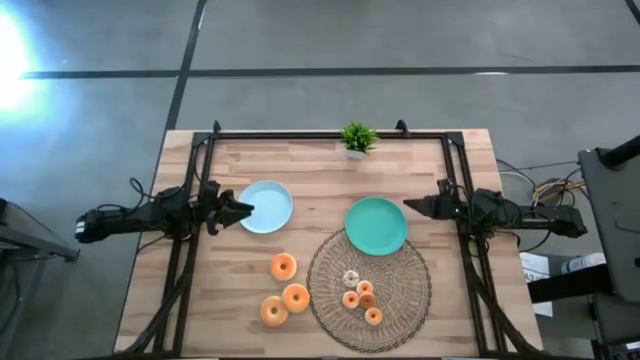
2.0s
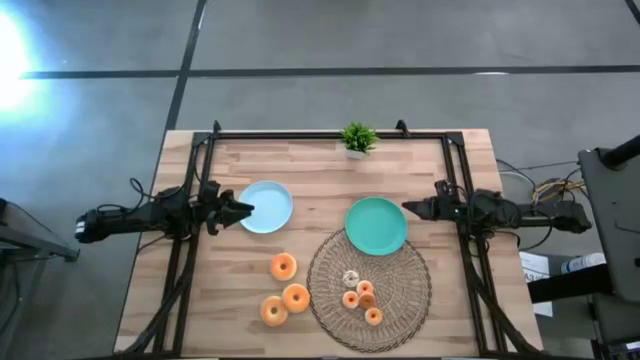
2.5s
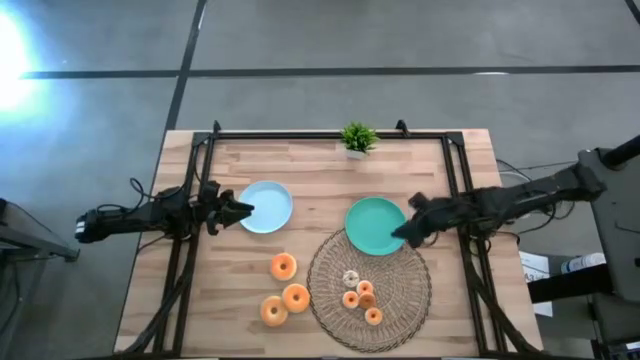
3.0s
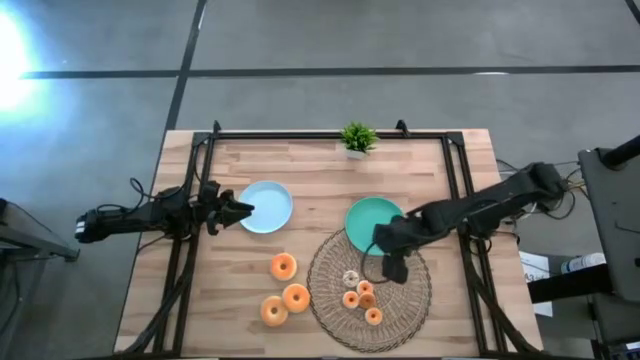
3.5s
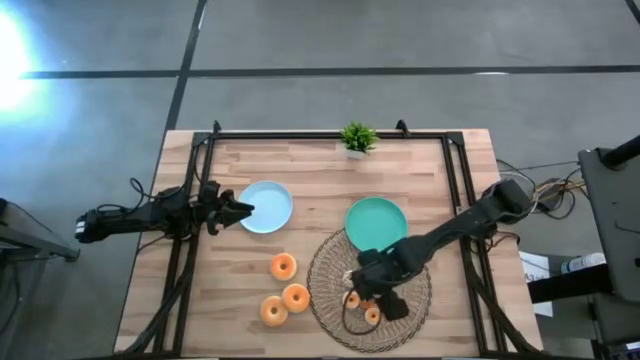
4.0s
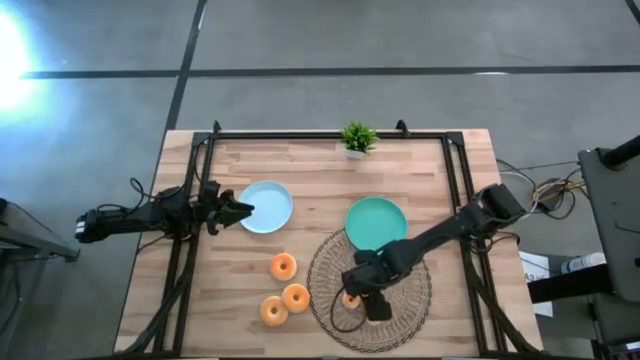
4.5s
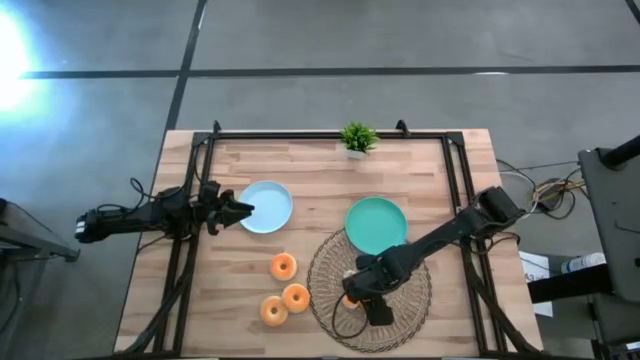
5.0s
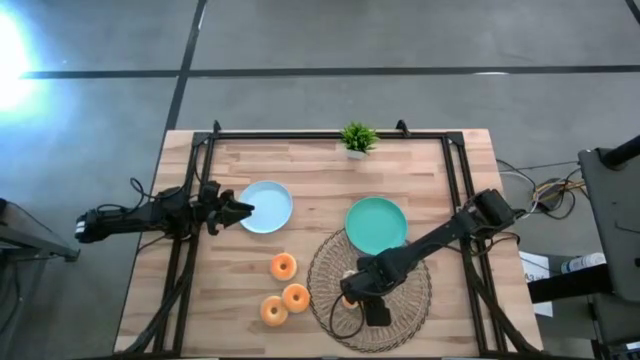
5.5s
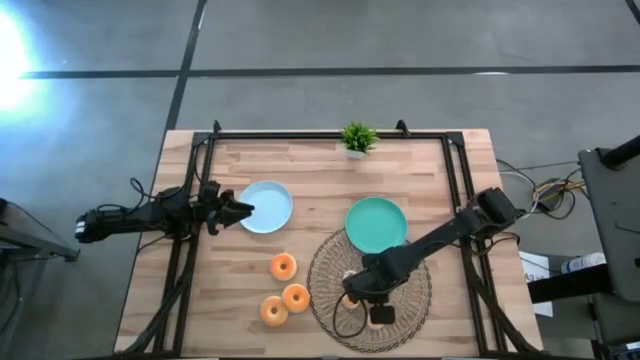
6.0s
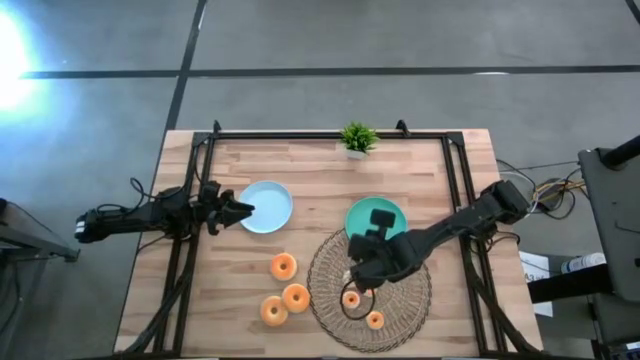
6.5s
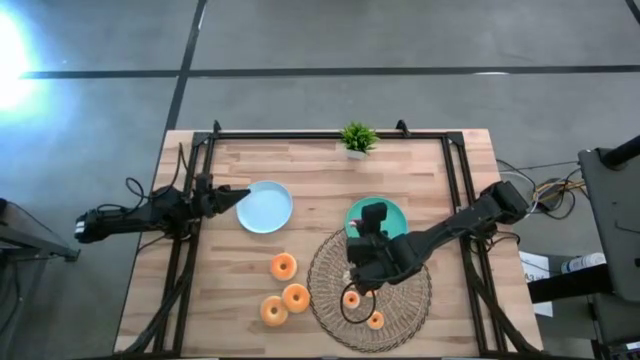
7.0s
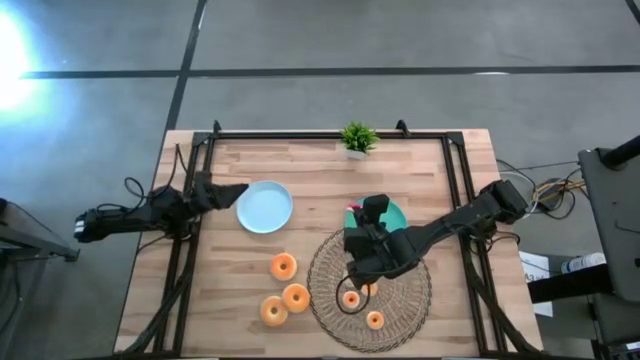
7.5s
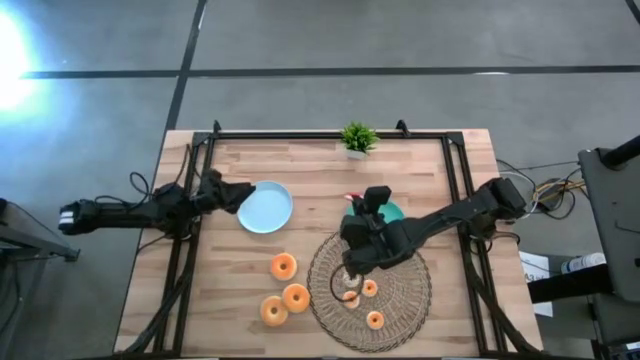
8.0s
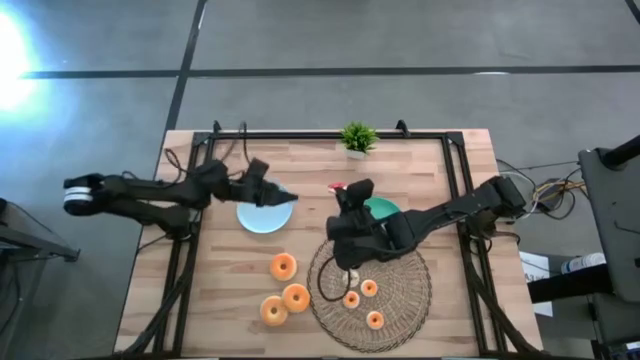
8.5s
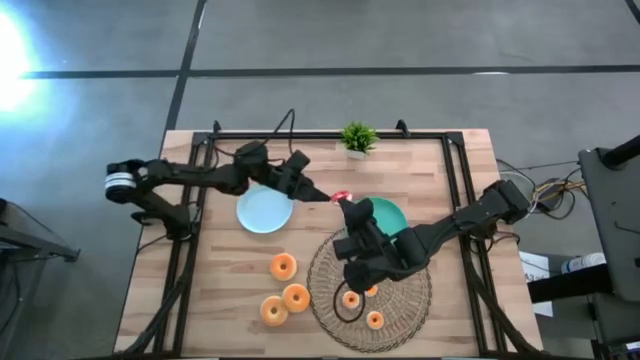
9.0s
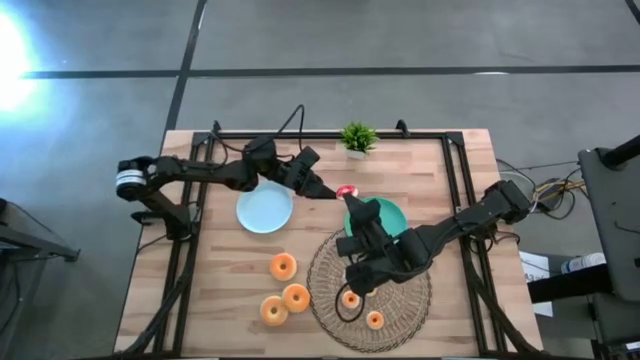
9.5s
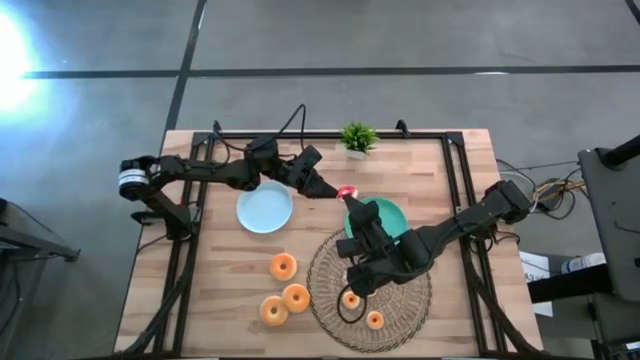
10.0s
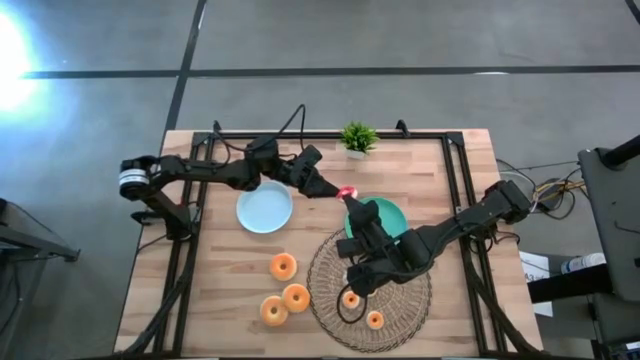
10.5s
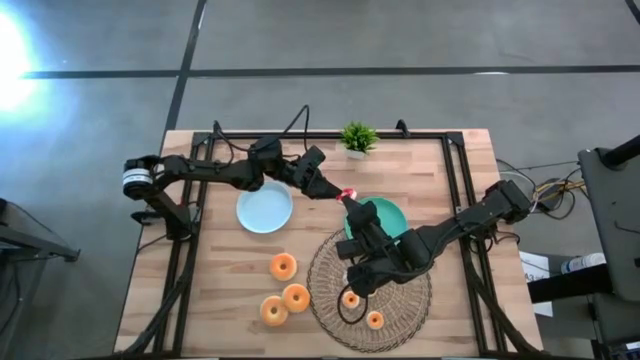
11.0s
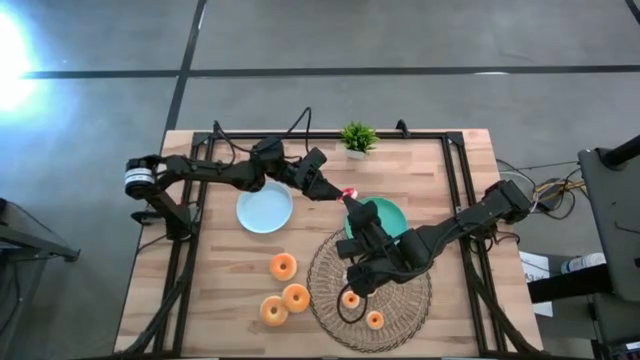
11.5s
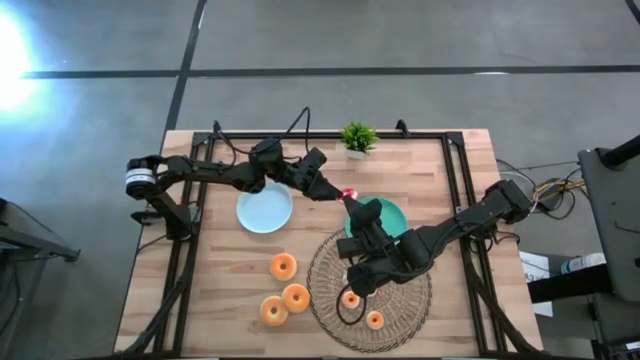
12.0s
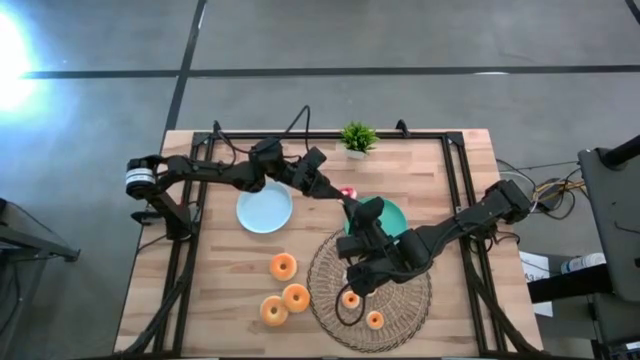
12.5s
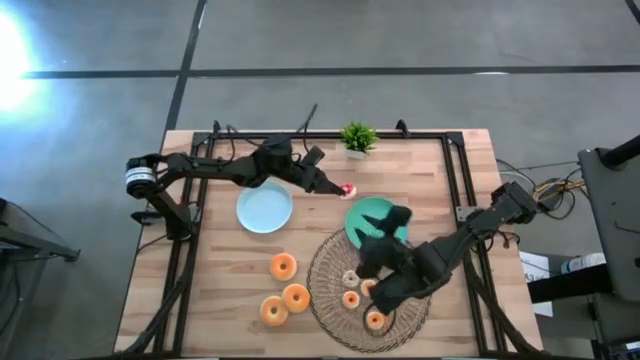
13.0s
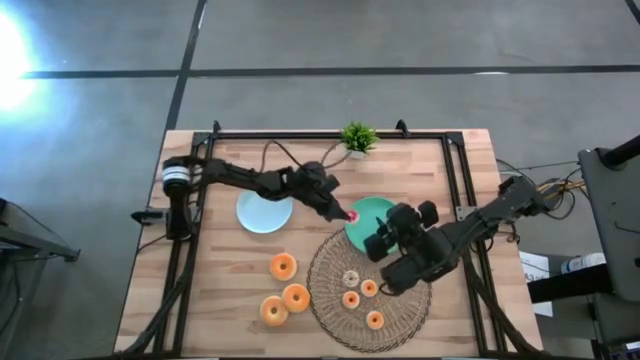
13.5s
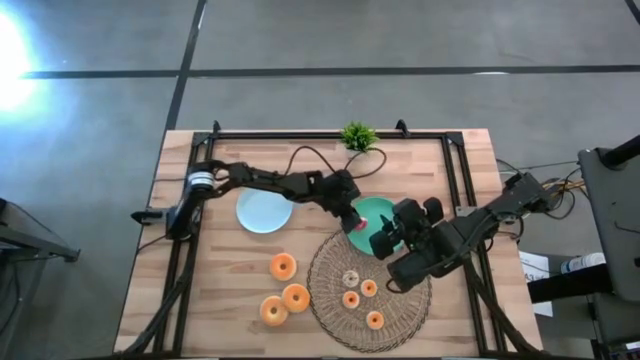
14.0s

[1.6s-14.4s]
Task: Pick & Place donuts
Put the small orange donut on the green plate

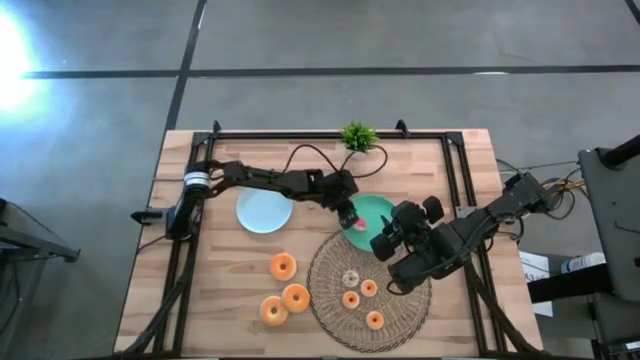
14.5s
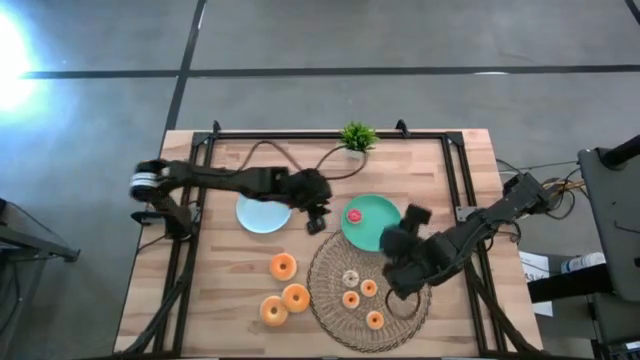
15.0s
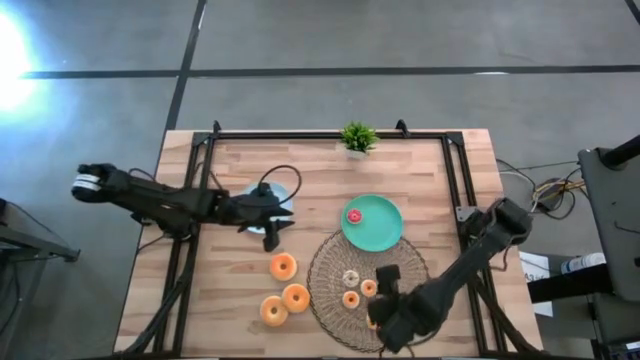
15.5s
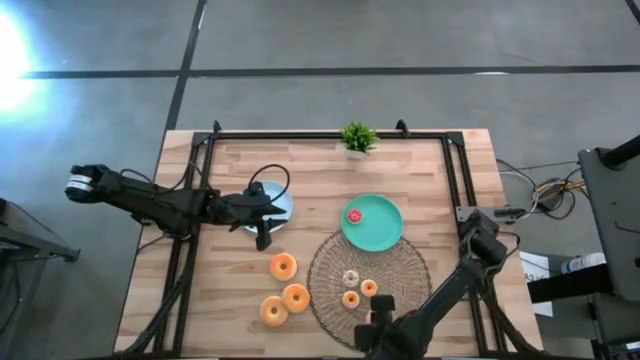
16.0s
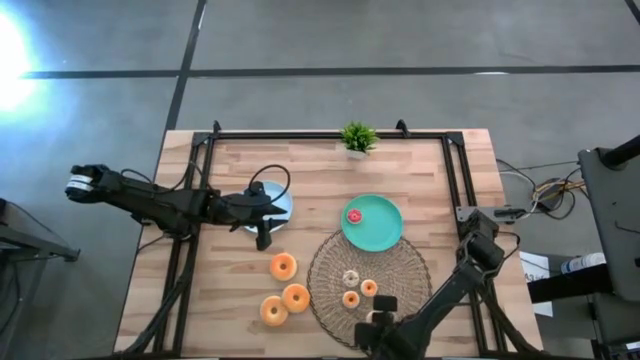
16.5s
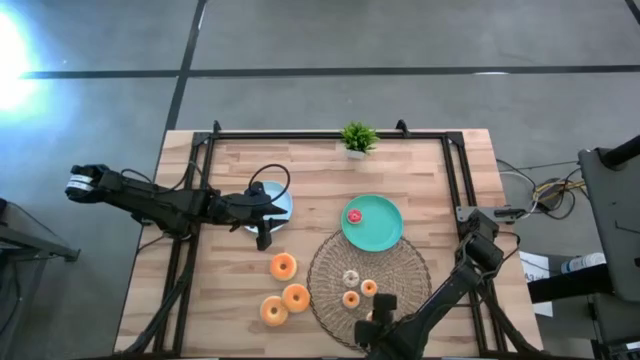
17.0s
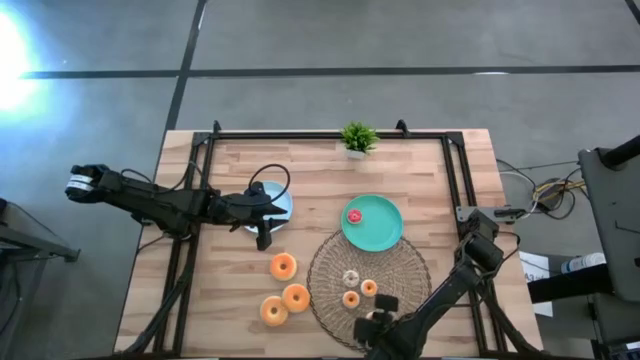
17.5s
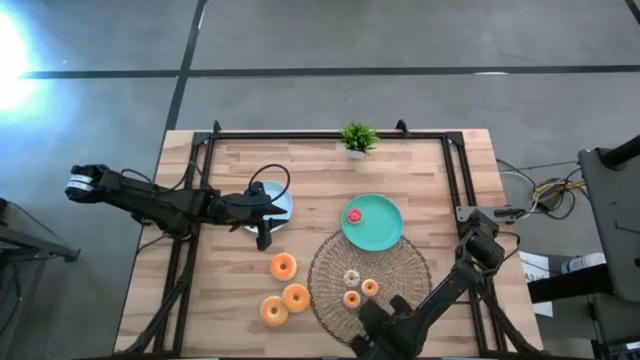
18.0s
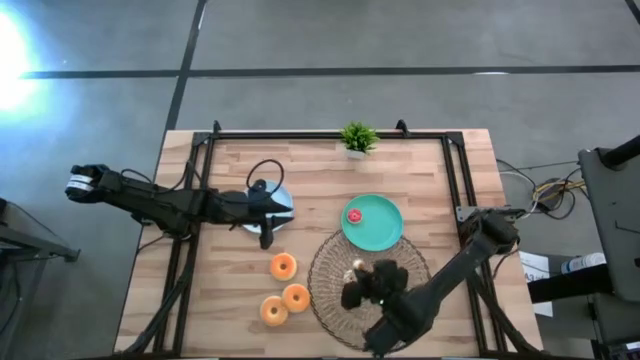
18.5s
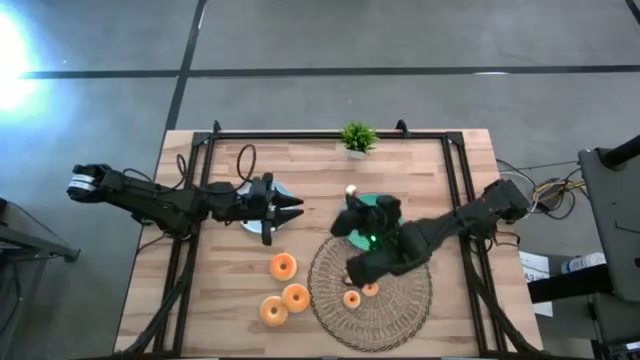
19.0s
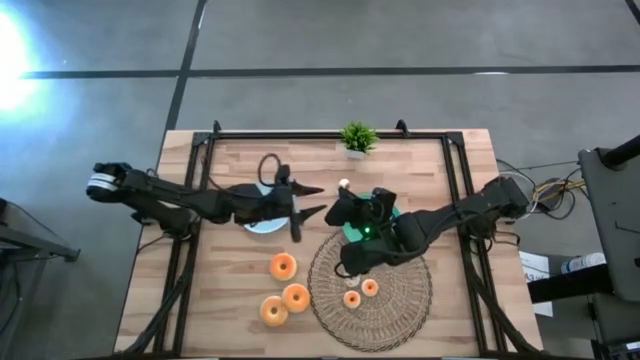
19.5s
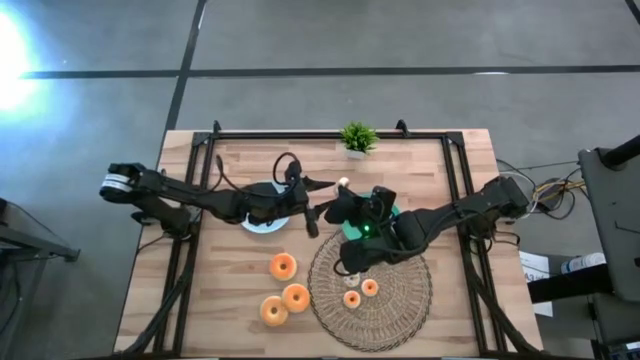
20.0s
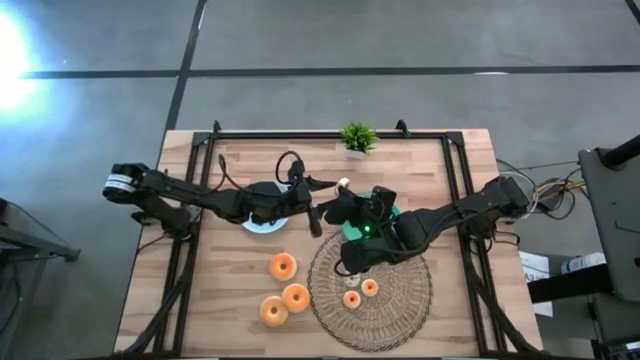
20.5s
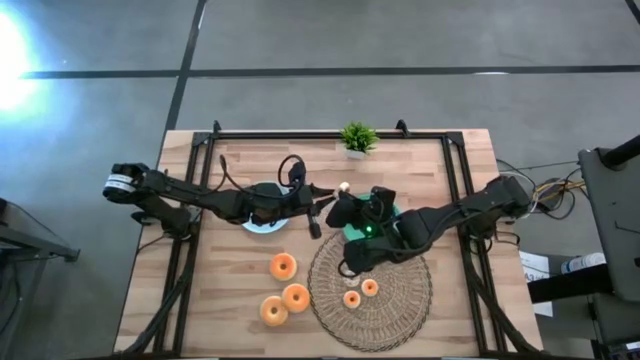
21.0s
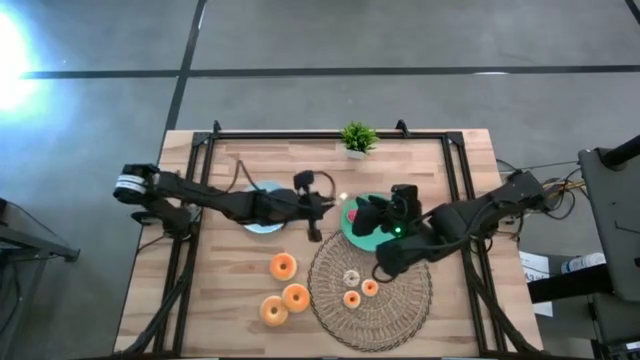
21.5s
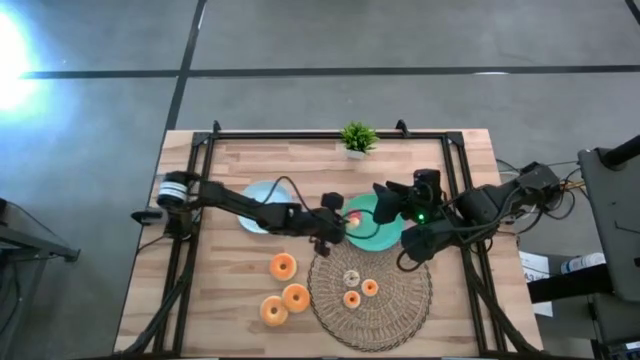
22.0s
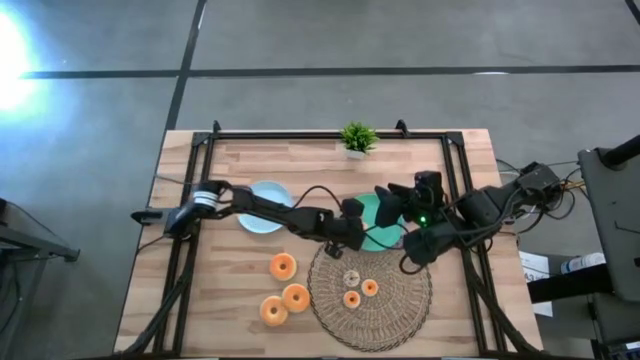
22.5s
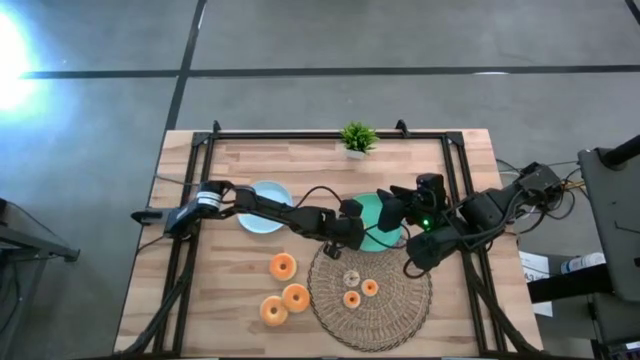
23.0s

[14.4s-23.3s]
Put the small yellow donut on the green plate
